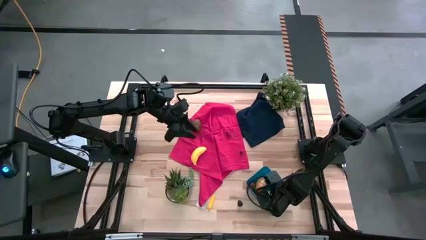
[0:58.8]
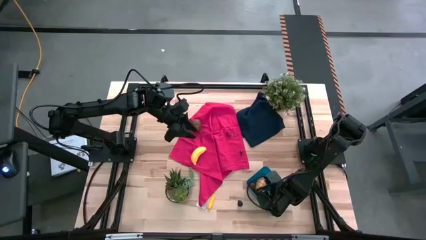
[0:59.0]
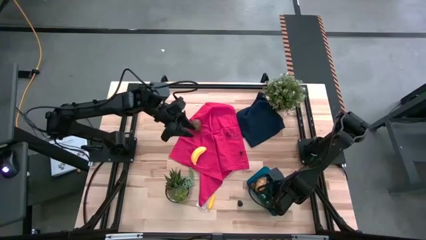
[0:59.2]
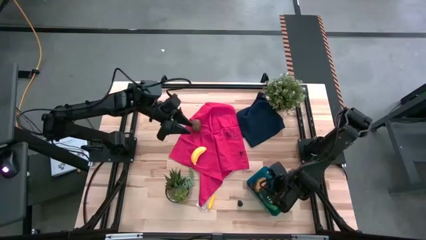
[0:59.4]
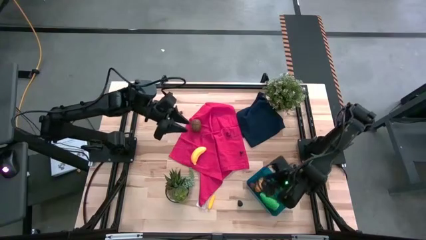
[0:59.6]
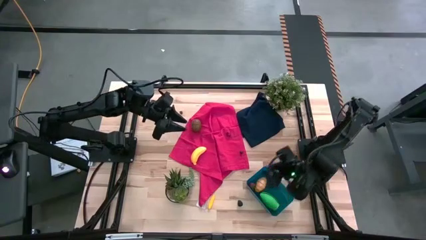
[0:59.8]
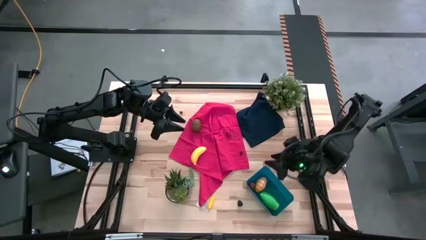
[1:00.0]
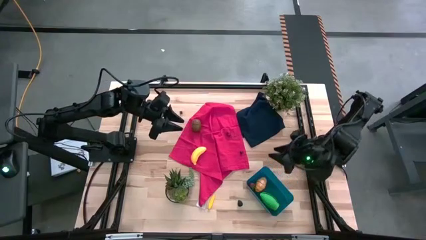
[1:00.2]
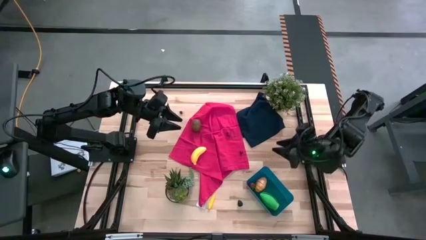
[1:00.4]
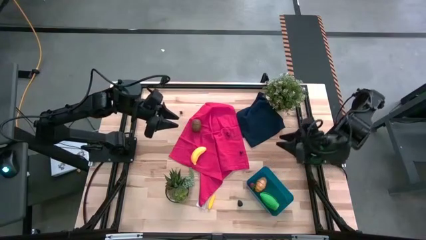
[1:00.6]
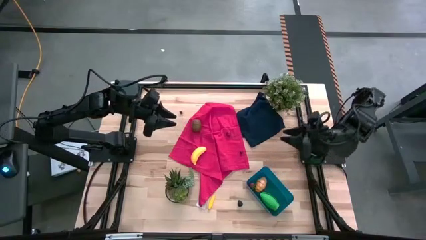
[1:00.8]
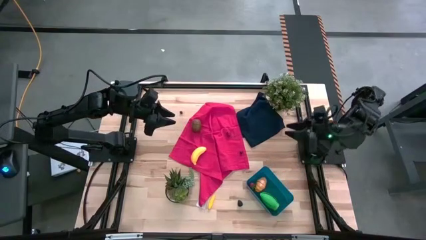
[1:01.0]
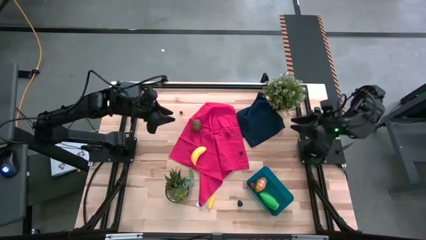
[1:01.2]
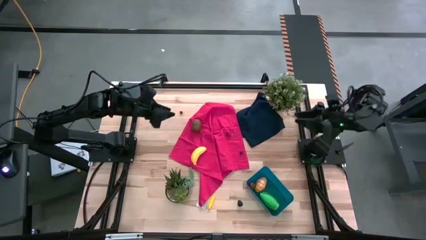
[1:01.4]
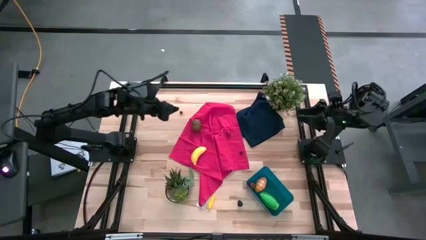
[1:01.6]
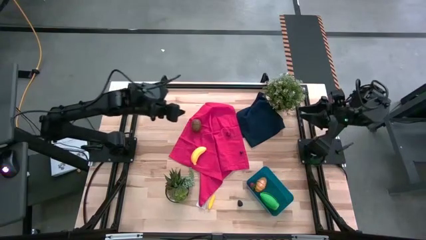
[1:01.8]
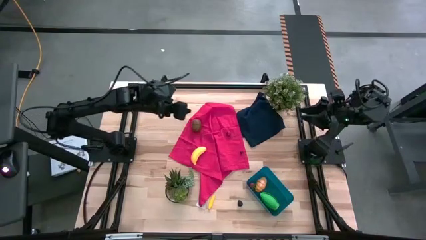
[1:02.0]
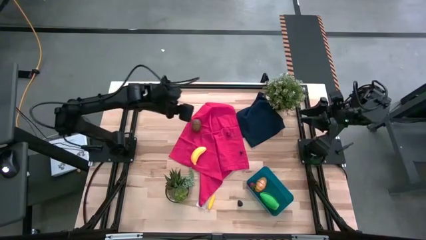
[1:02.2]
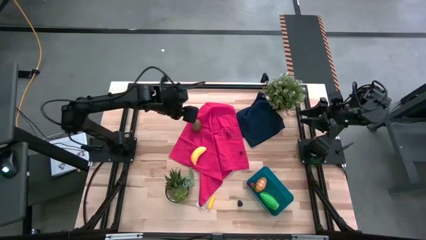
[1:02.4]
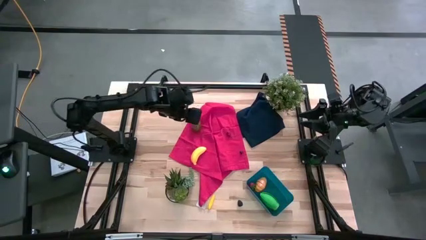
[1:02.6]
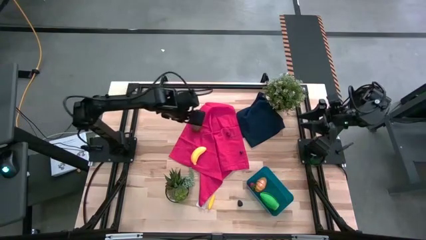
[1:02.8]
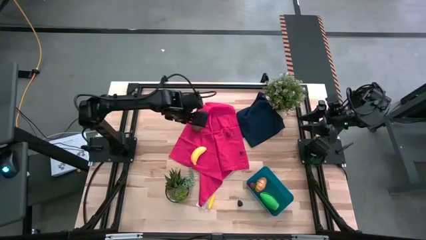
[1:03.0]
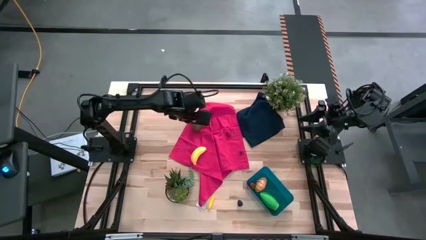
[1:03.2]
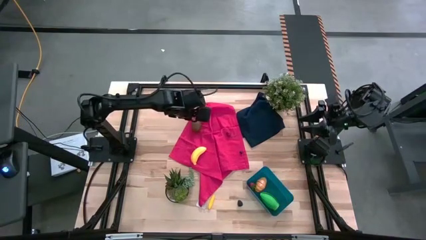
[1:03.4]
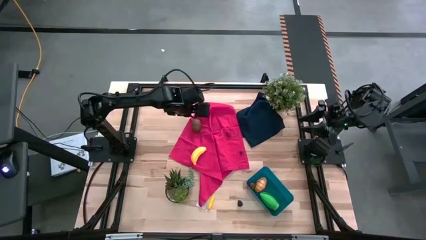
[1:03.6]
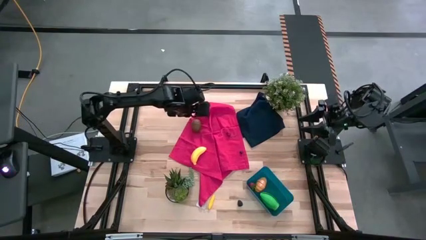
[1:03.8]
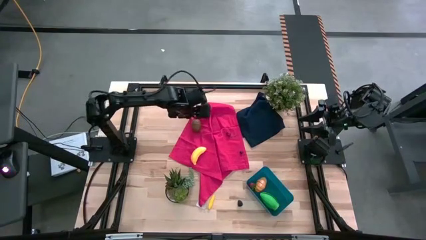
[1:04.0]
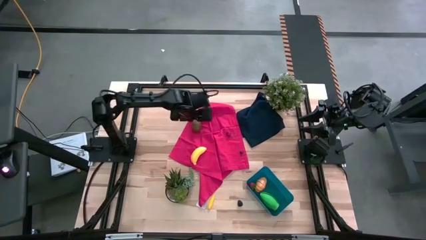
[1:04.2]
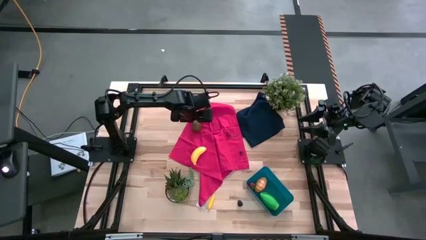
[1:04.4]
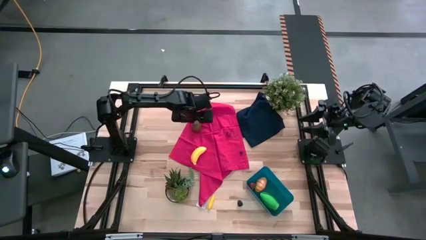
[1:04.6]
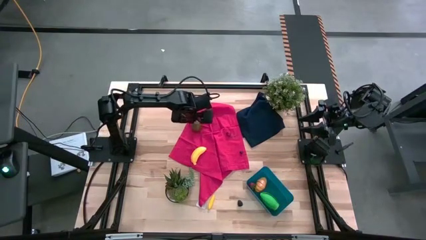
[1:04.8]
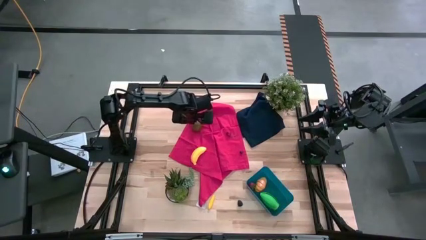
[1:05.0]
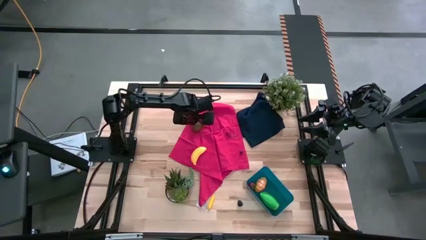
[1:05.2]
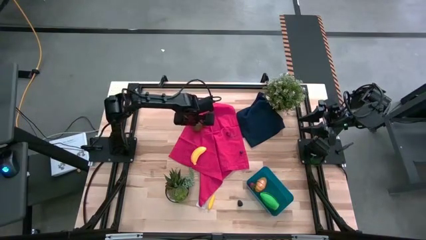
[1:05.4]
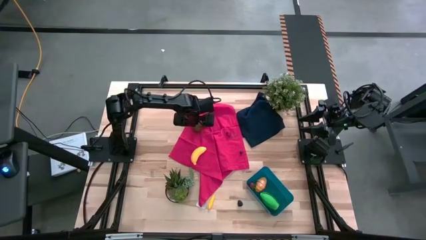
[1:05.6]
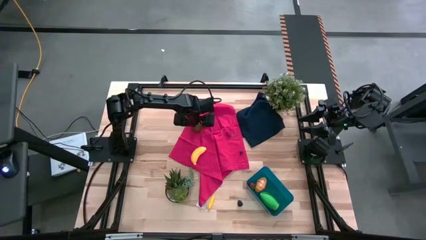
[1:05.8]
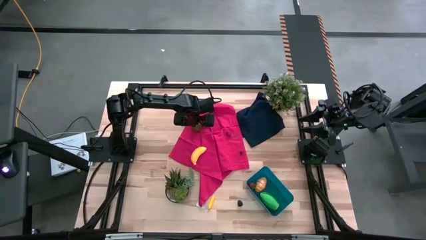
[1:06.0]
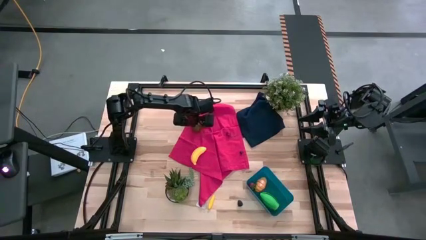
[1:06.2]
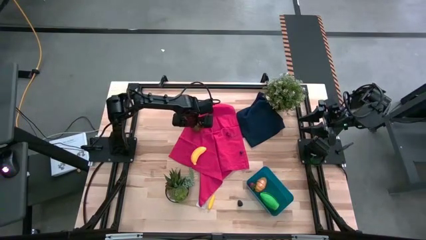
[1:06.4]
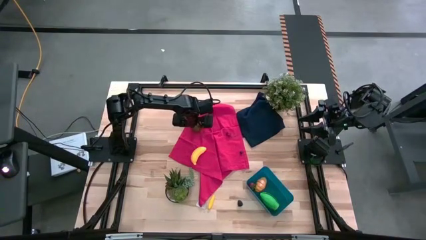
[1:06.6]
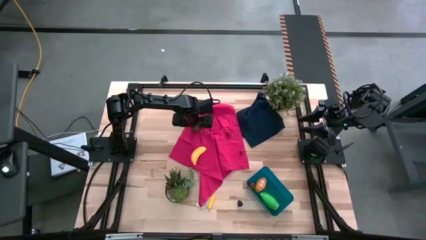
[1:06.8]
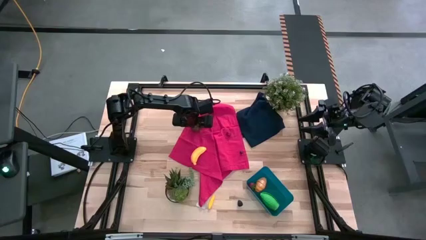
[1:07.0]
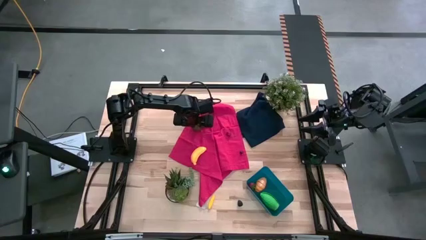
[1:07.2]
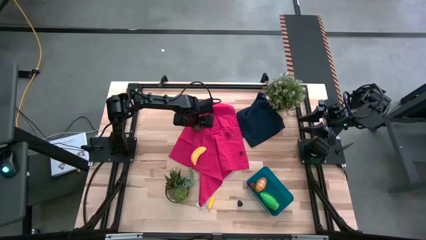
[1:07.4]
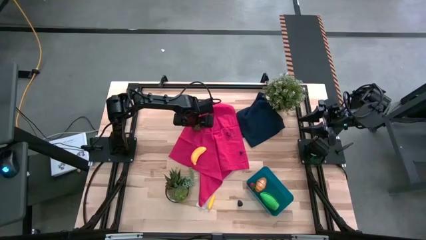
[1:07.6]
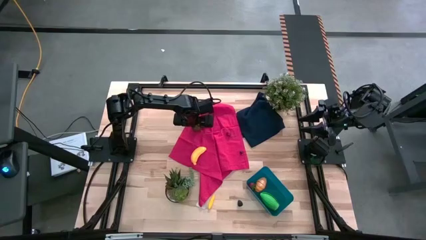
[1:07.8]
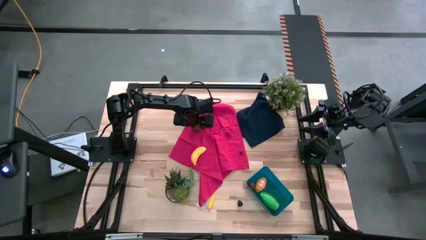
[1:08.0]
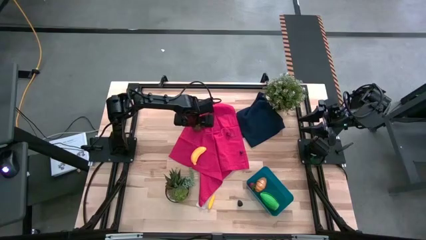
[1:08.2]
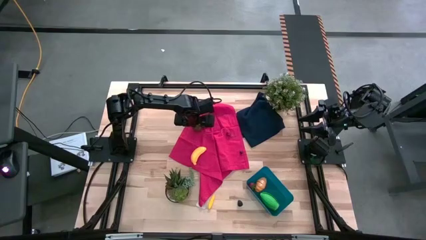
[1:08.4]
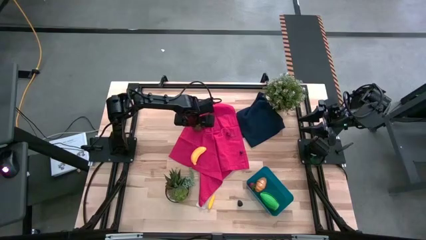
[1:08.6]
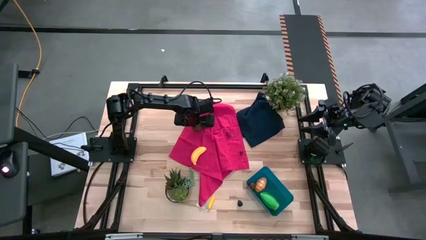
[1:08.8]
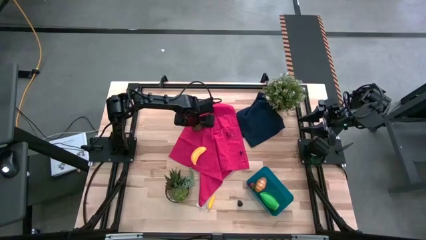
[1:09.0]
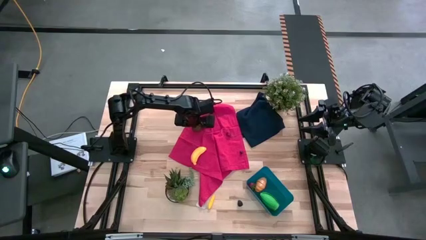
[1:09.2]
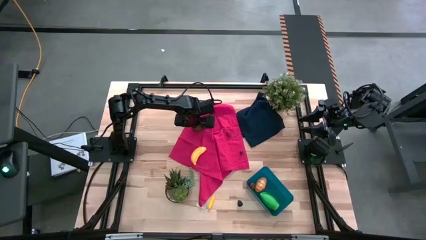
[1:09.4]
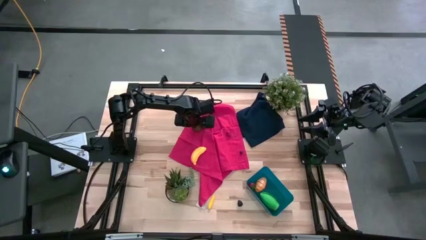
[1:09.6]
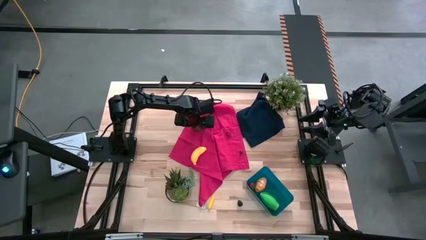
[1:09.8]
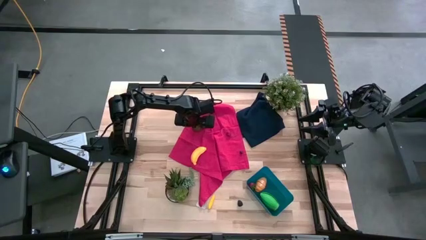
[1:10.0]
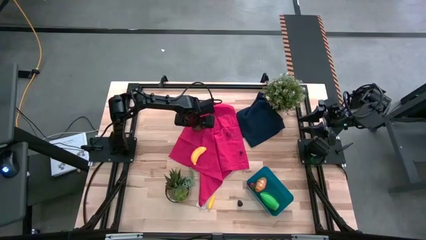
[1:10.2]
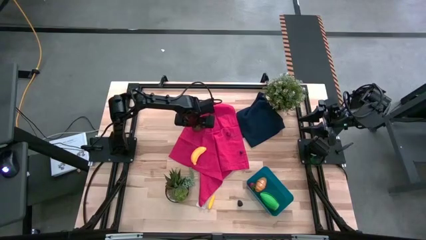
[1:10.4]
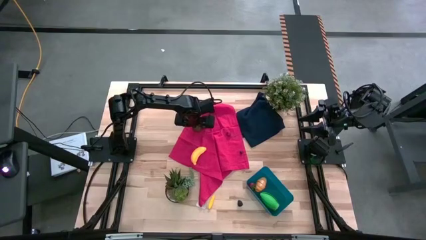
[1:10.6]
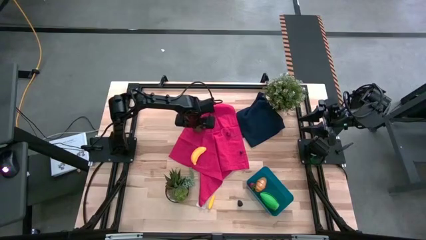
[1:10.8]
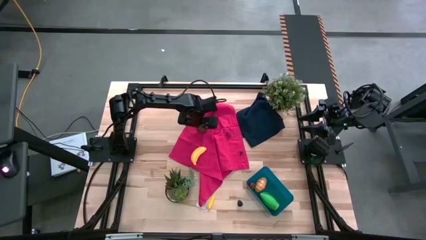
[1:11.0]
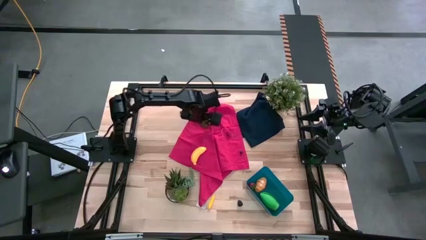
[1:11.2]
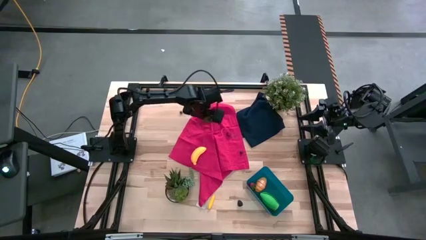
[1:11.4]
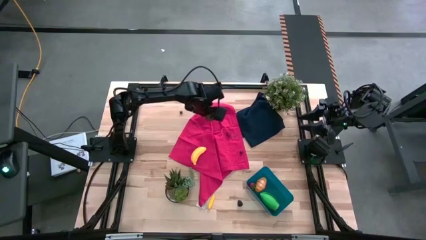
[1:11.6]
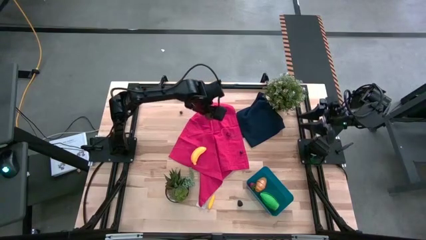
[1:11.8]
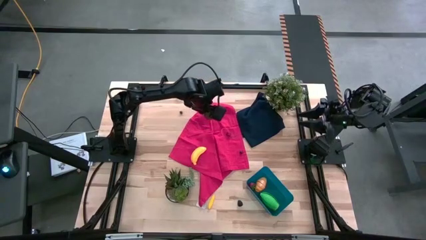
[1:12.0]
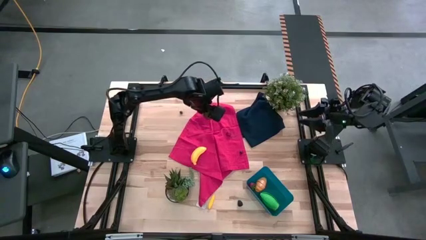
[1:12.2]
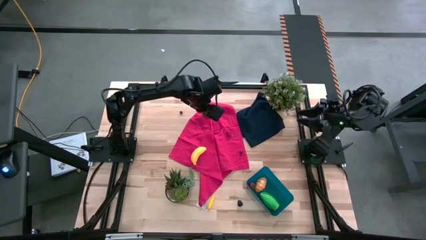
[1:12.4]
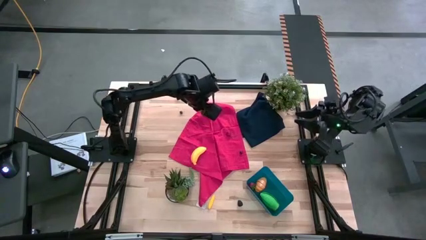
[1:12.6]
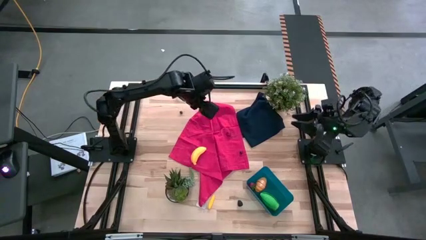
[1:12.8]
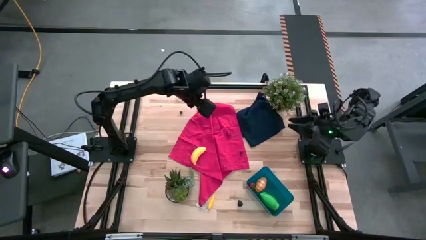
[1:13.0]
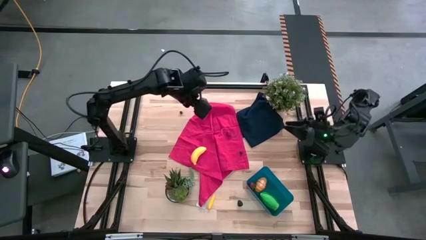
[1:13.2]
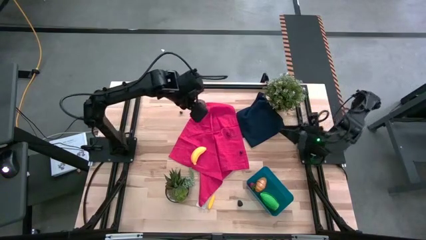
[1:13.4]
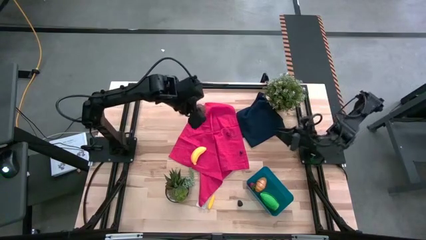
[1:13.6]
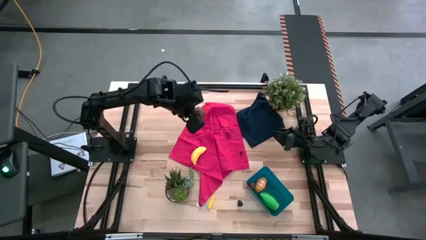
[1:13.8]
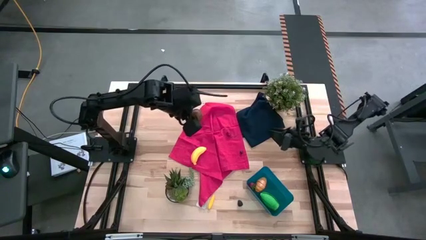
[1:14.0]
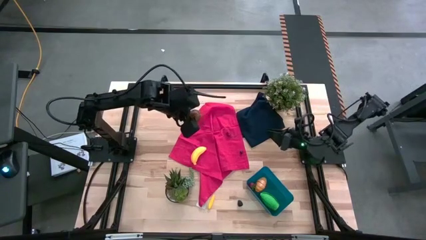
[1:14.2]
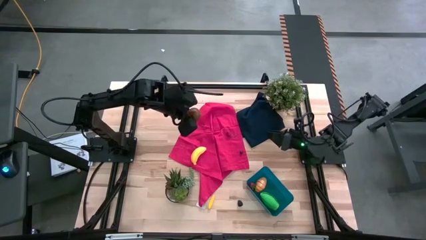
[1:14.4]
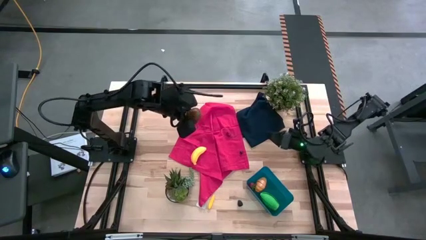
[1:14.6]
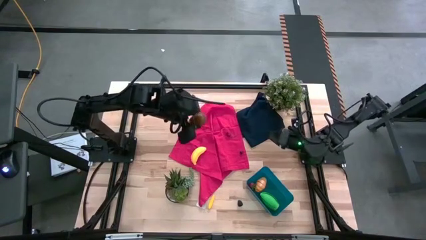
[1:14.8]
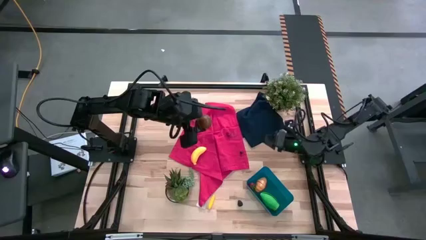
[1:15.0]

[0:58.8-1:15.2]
Task: Pick and placing Produce into tupperware
Put the kiwi into the blue bin
